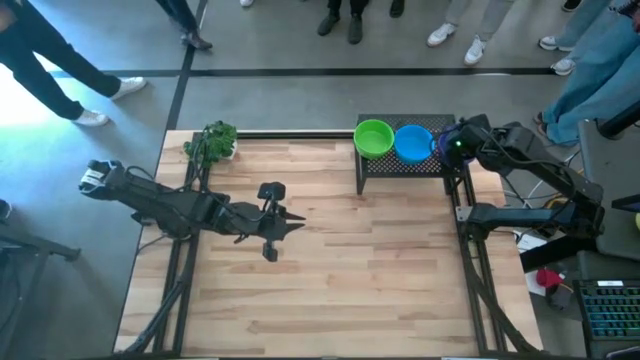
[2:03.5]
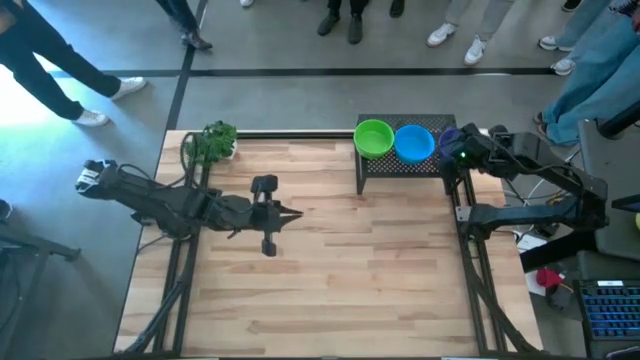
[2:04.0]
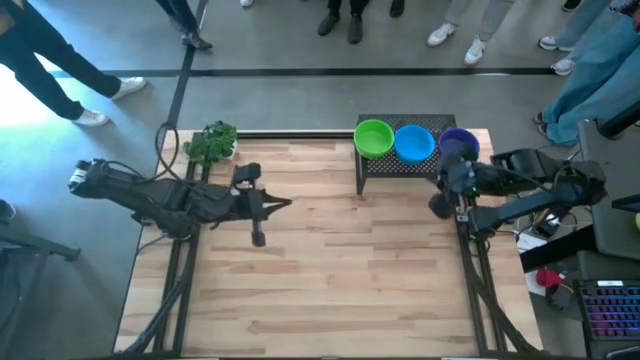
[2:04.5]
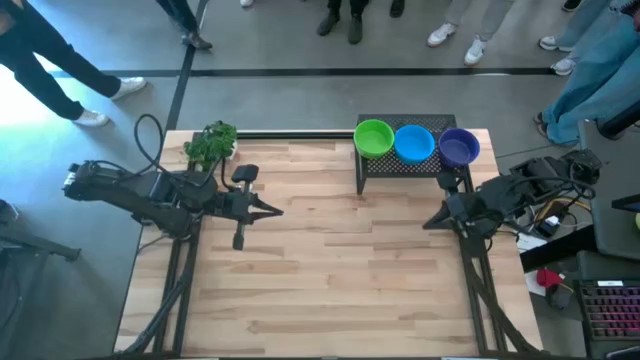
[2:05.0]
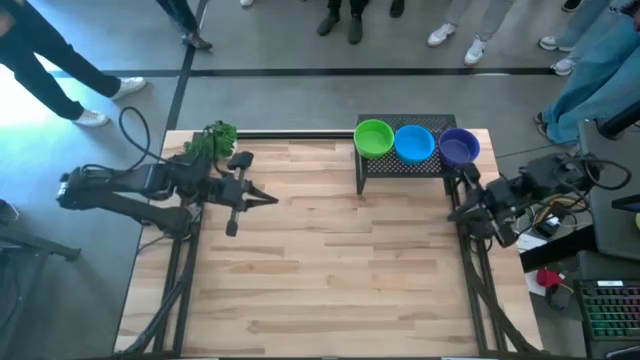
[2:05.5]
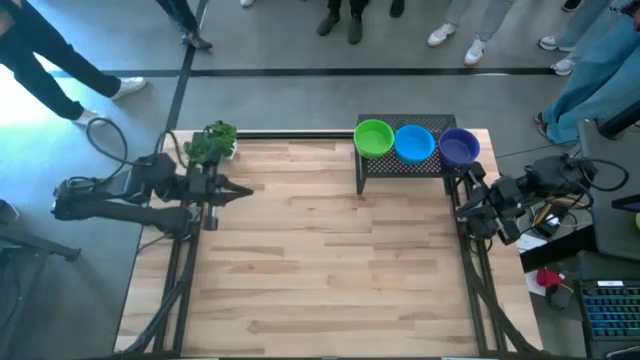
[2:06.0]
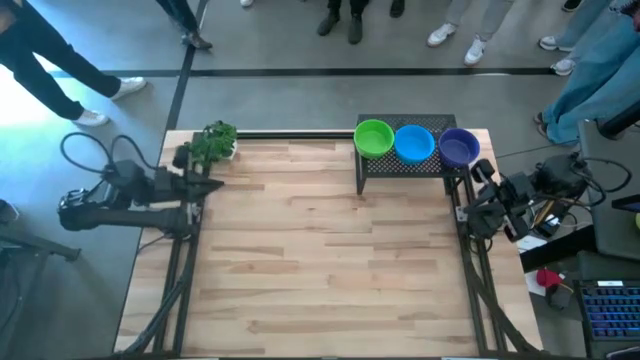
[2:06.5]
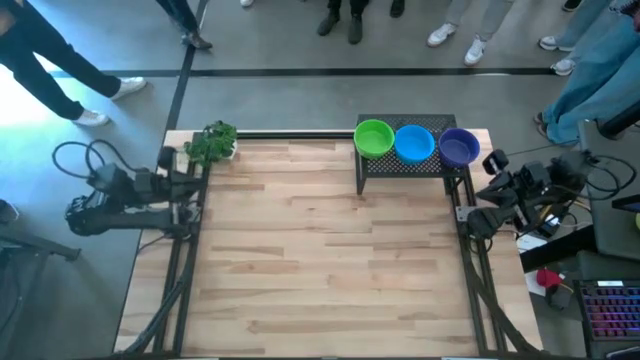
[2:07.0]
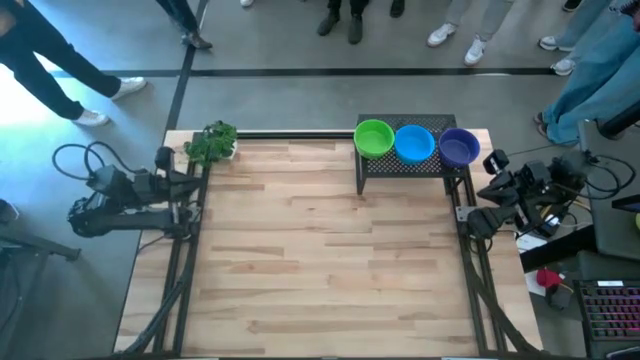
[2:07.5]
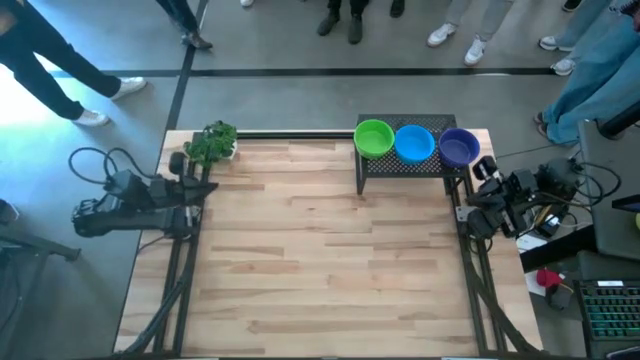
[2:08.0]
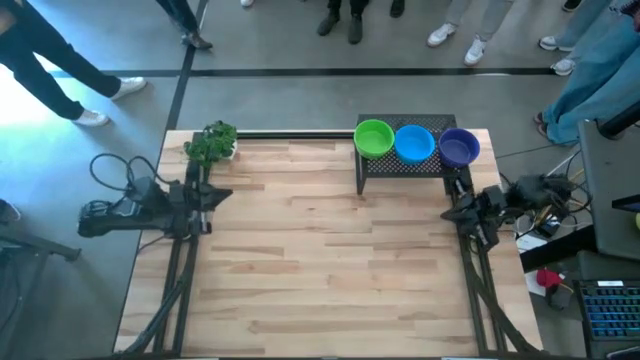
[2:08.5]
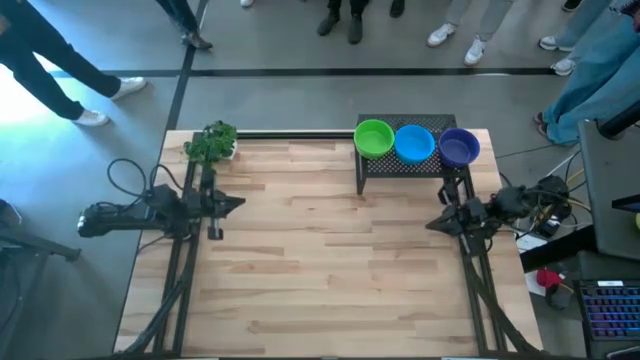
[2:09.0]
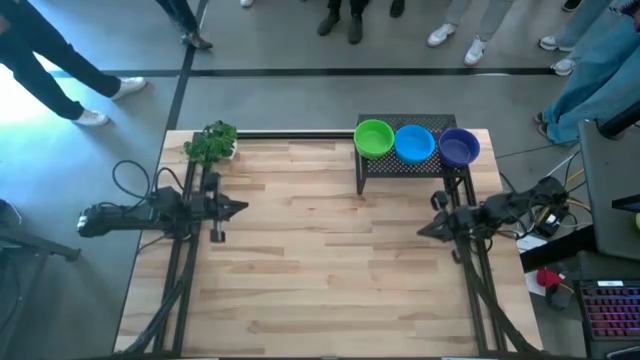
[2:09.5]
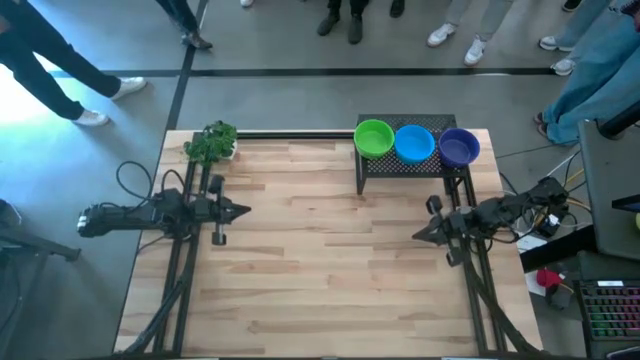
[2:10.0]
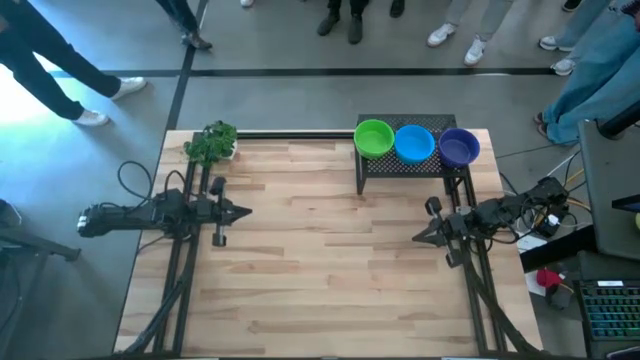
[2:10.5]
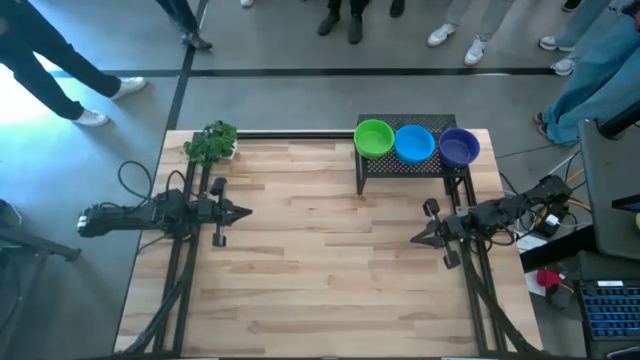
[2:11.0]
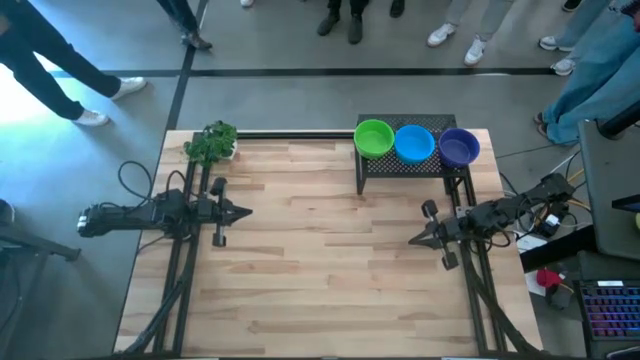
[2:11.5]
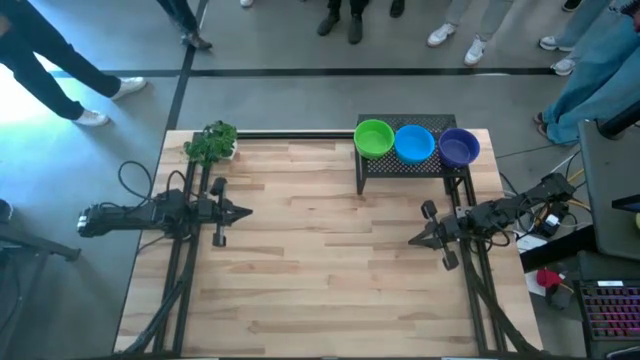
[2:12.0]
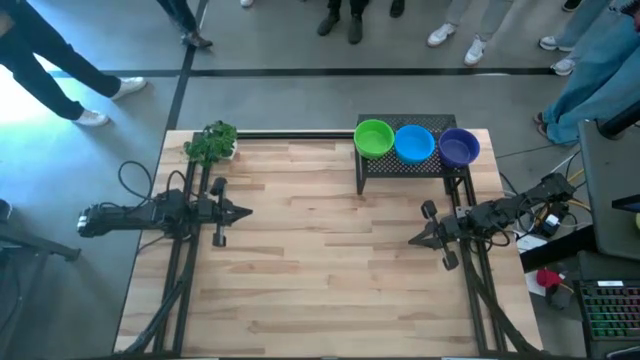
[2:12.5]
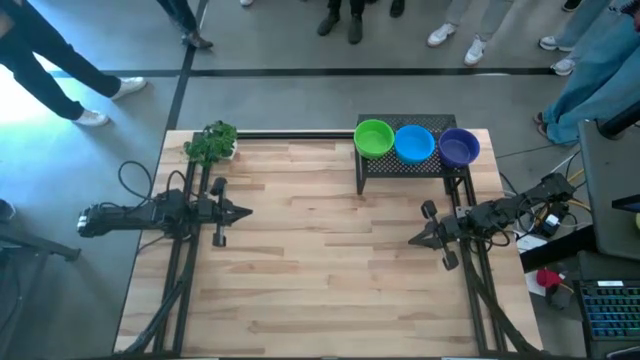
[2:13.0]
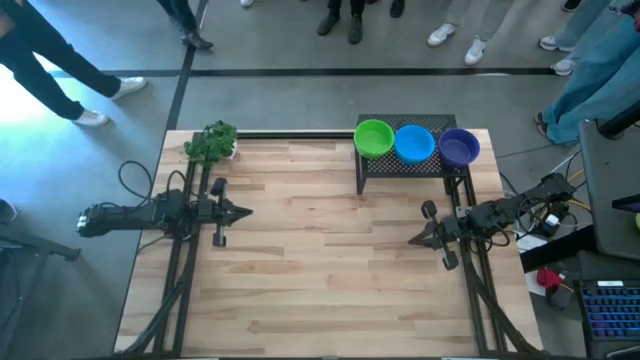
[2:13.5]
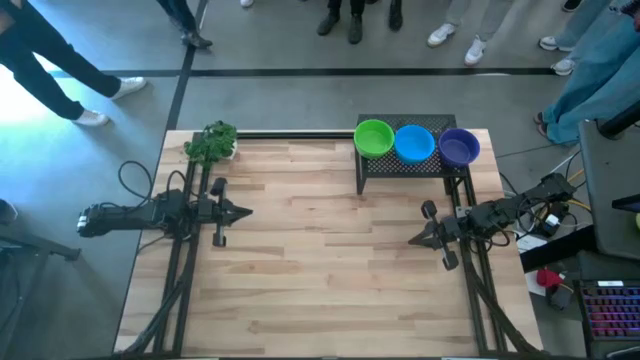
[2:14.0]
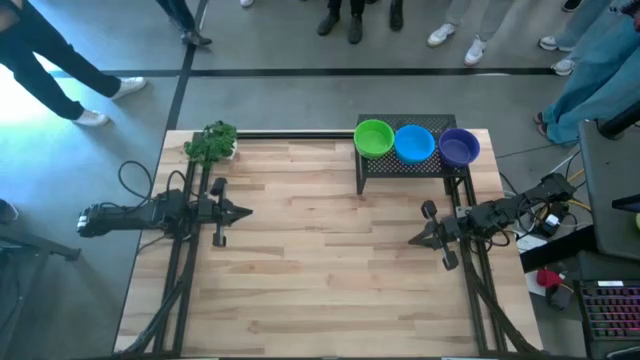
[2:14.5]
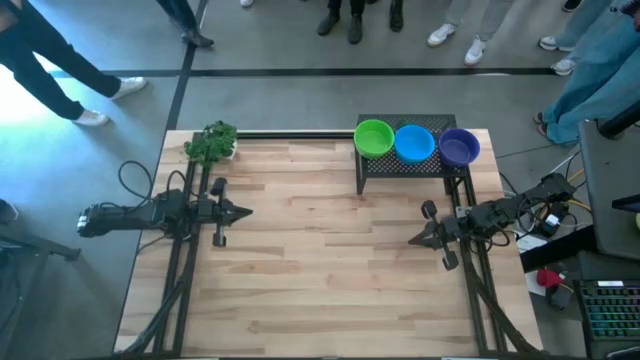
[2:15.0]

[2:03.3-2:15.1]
Task: Pick & Place Mini bowls
Return to Home Position

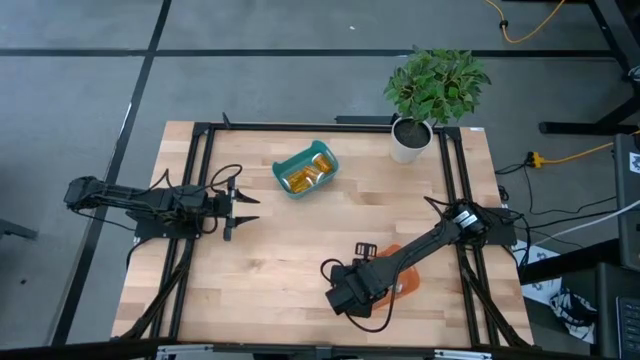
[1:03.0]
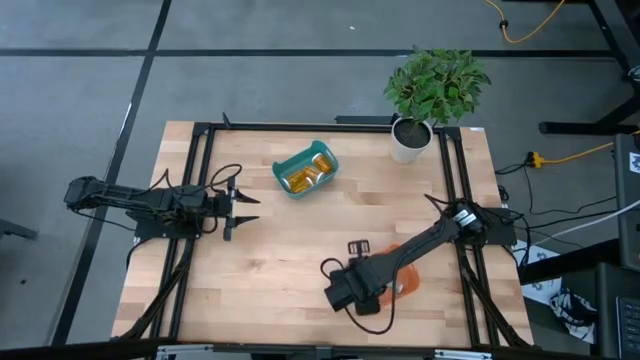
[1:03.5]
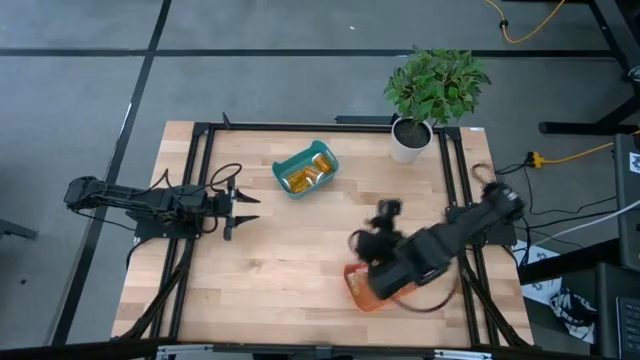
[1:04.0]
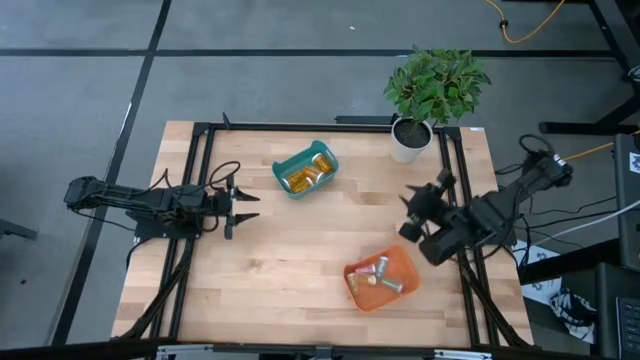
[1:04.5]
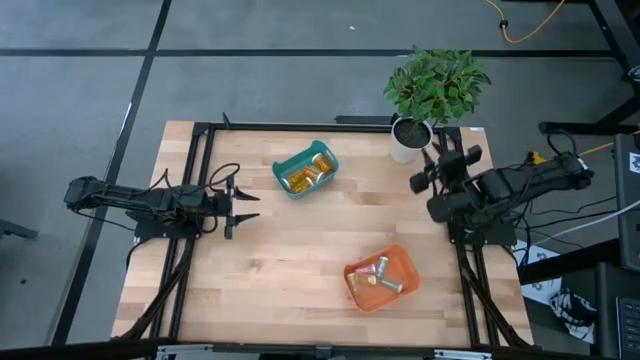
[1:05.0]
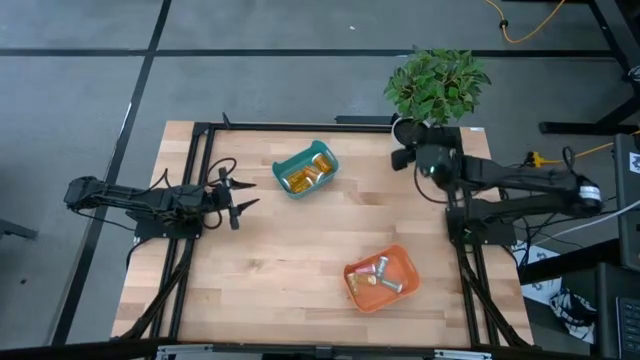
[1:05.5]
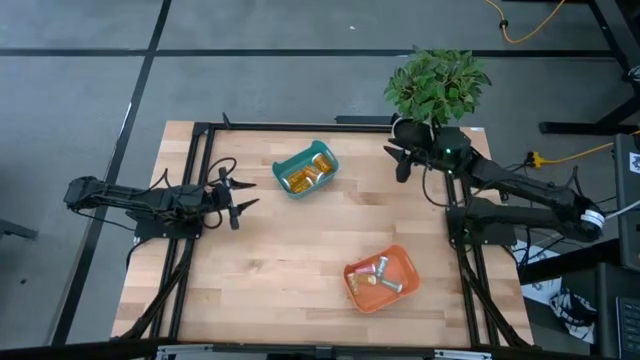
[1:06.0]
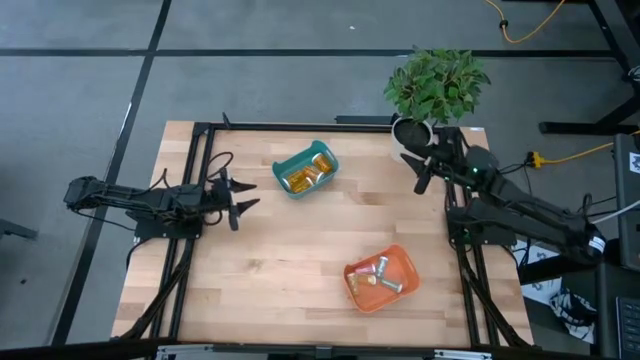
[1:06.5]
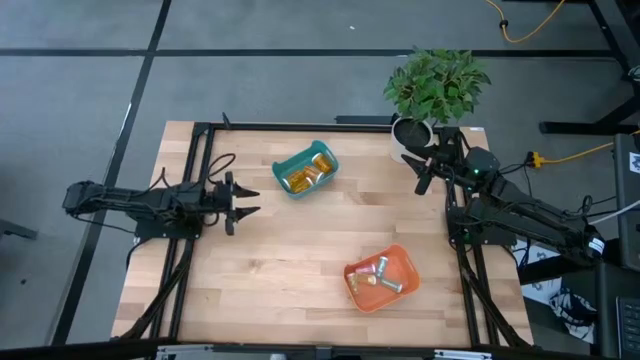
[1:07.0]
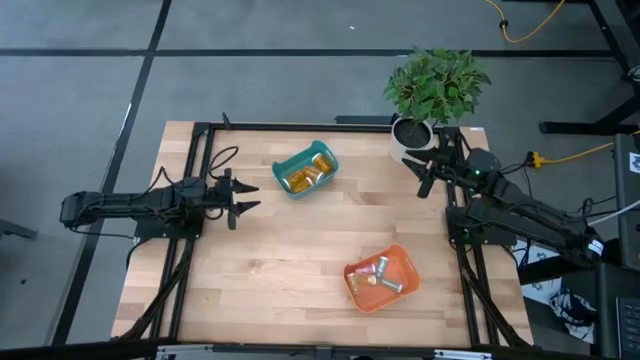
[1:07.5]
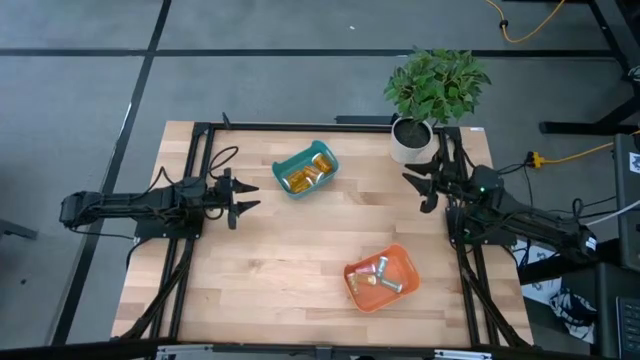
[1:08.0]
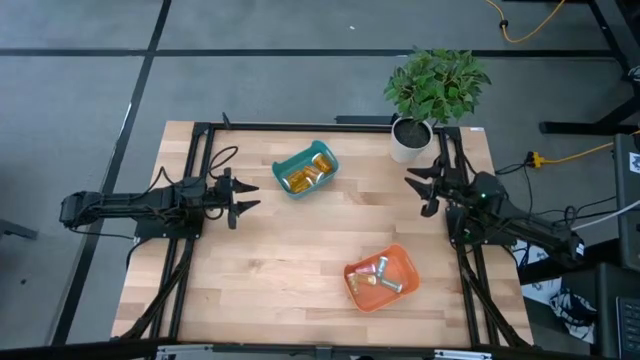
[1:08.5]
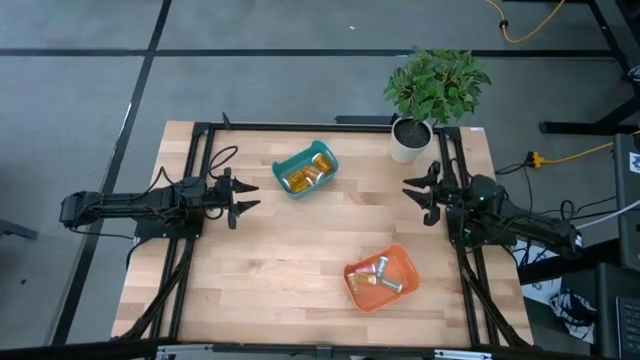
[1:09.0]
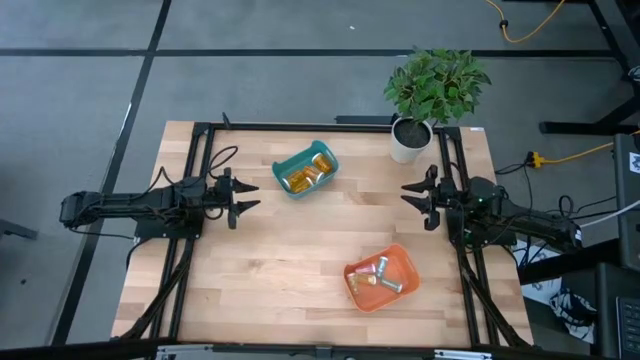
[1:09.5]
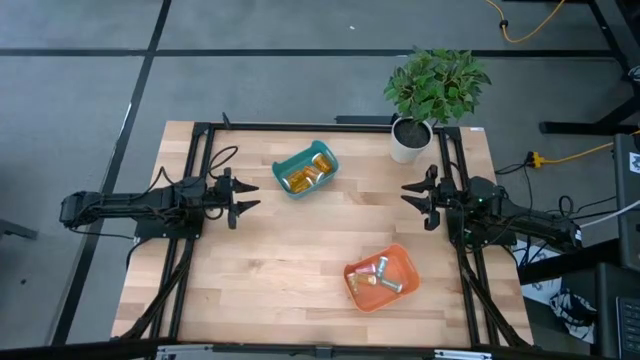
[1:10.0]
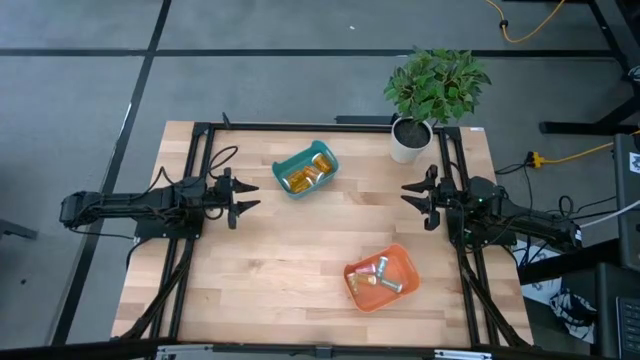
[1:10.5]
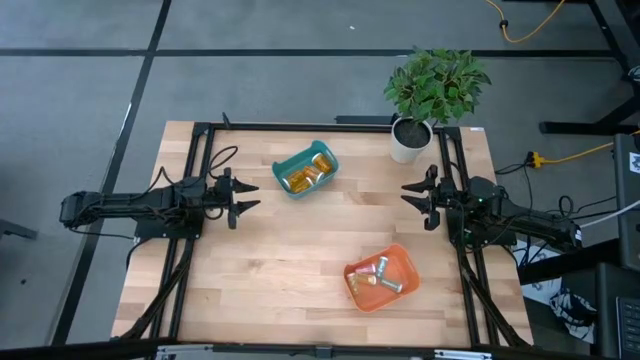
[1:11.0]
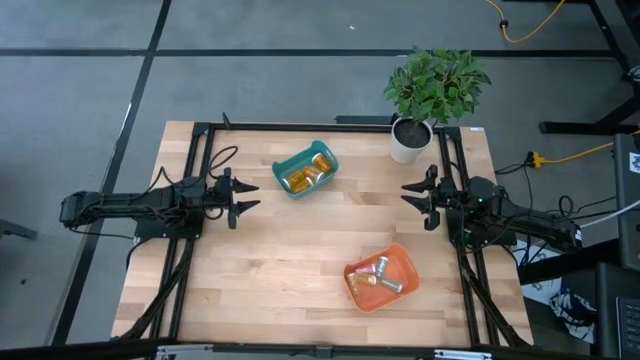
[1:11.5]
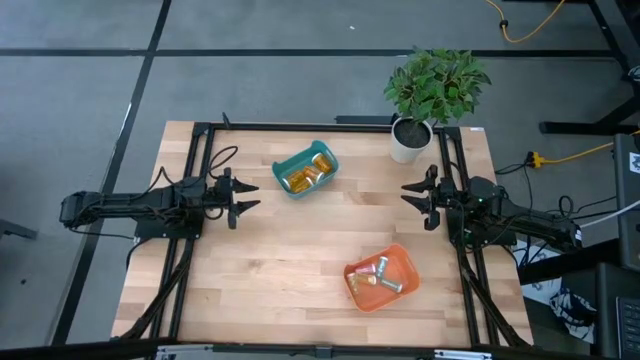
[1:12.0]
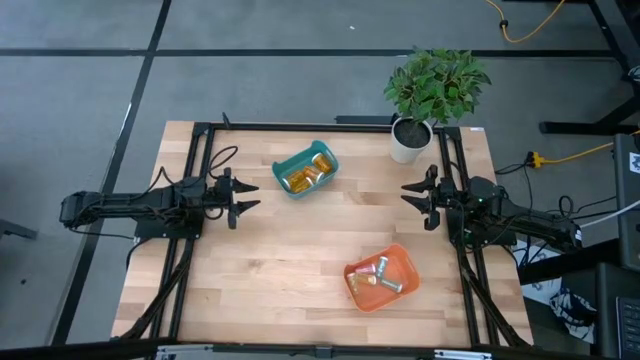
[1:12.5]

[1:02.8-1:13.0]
Task: Pick and place medicine bottles into bin by pill shape (circle, oval)
Return to Home Position

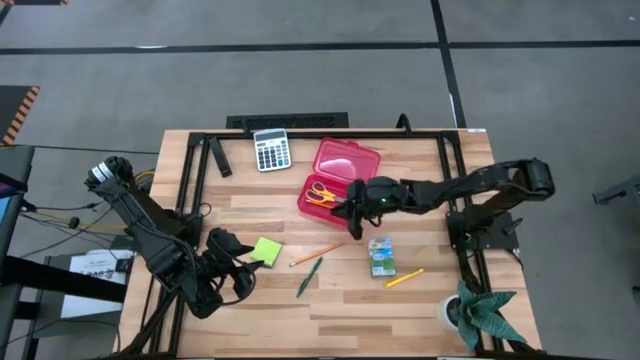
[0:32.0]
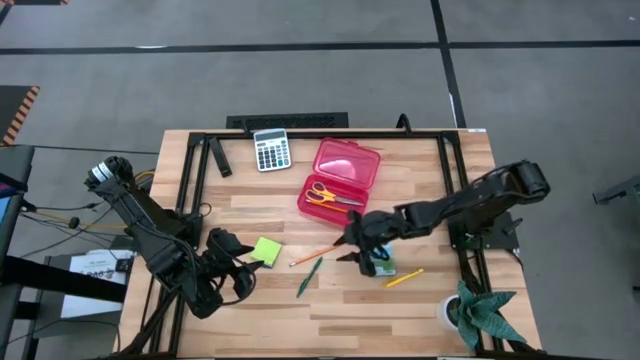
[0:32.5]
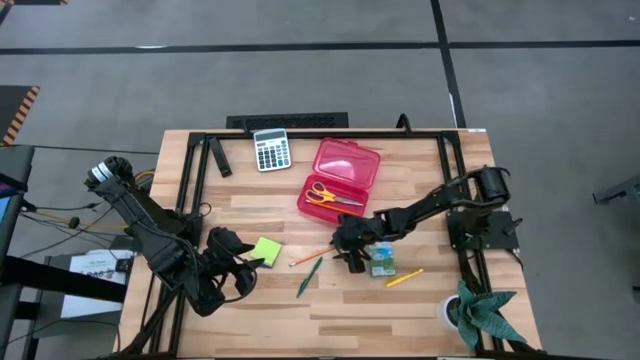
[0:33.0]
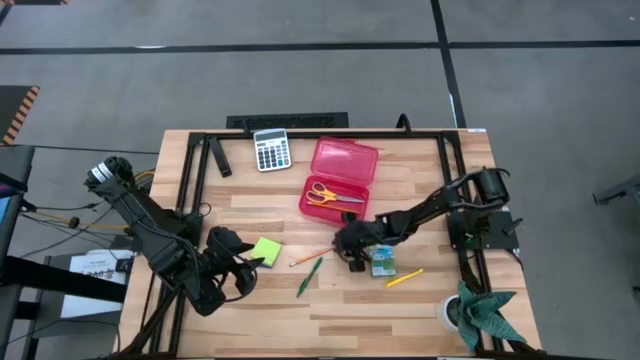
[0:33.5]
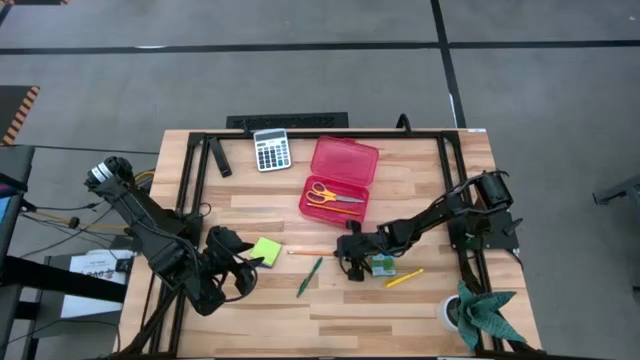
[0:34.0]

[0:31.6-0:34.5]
Task: Pack school essentials
Put the pencil into the supply box
